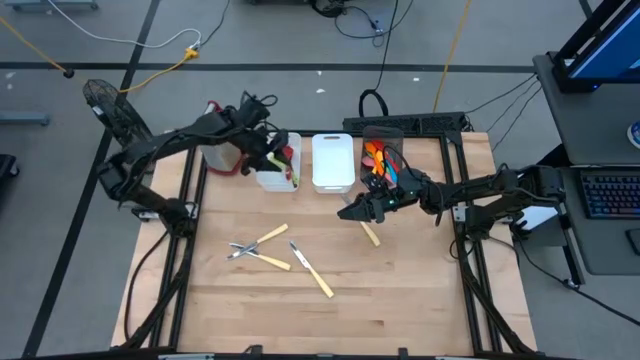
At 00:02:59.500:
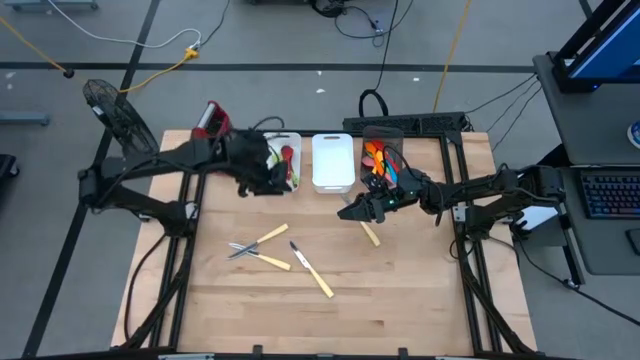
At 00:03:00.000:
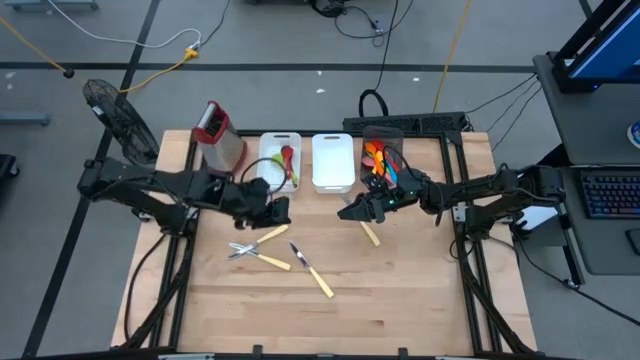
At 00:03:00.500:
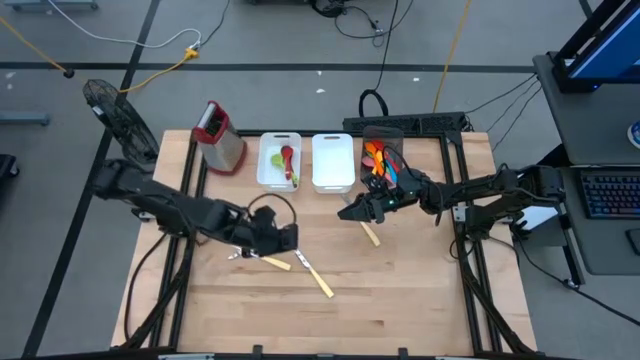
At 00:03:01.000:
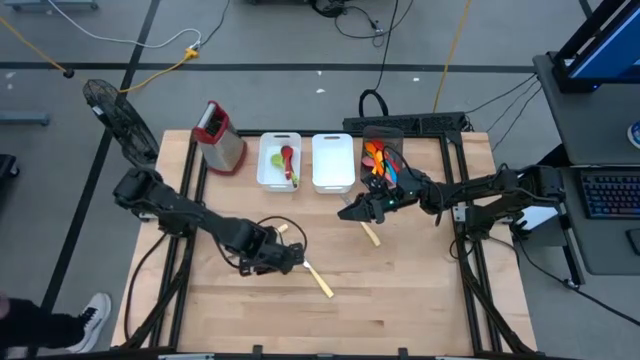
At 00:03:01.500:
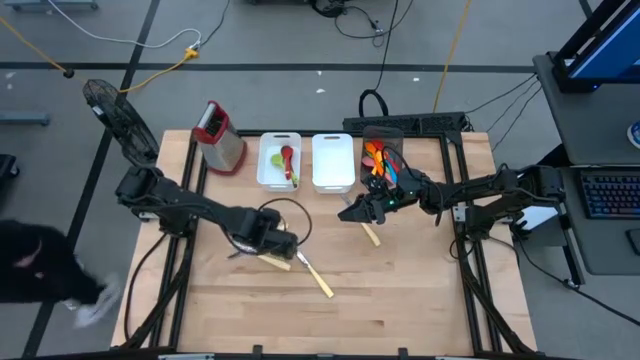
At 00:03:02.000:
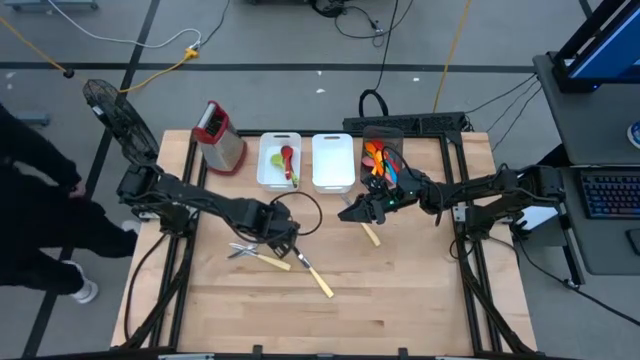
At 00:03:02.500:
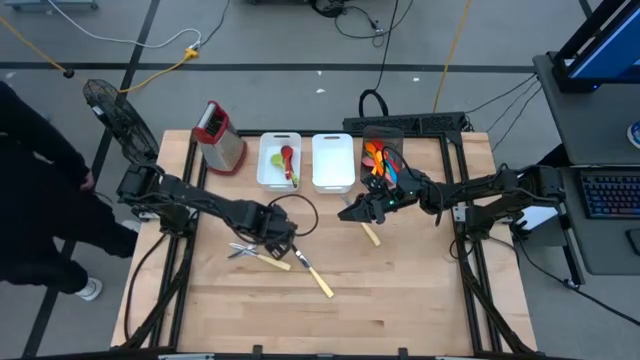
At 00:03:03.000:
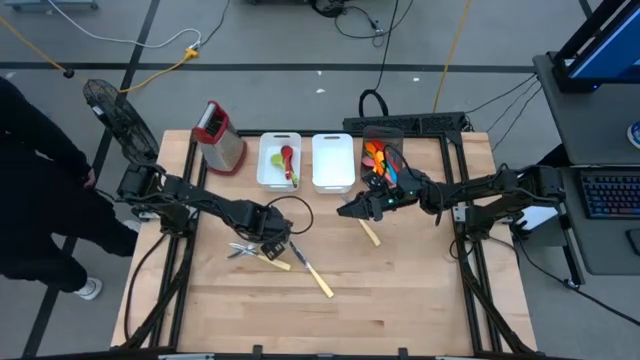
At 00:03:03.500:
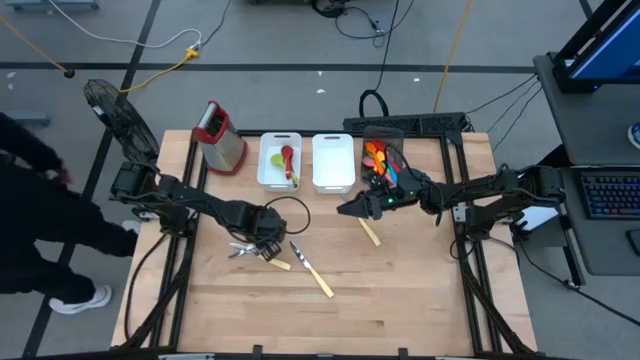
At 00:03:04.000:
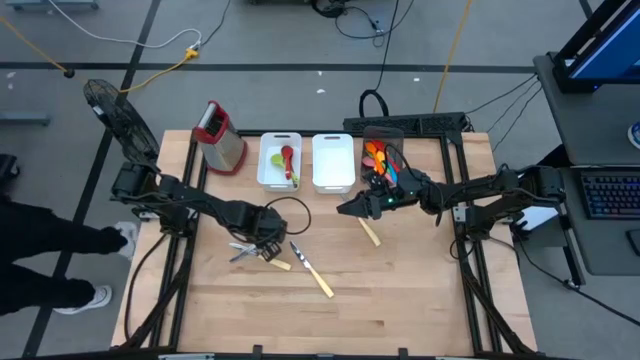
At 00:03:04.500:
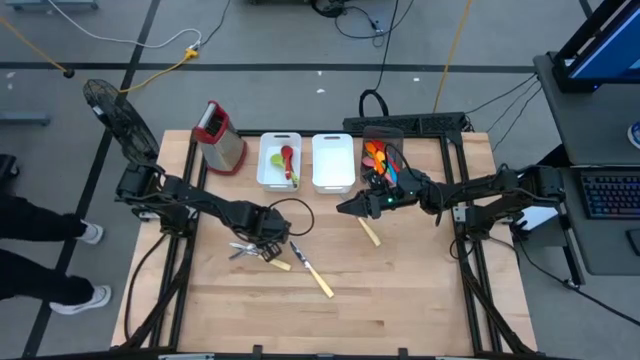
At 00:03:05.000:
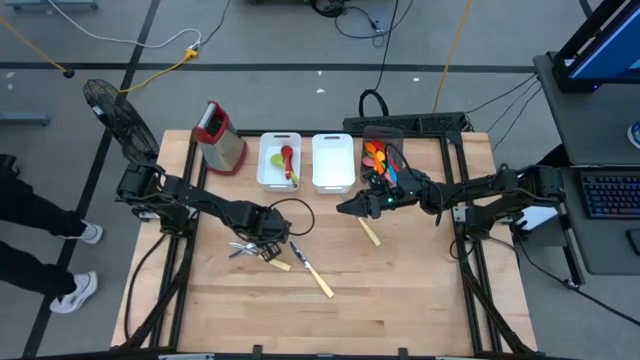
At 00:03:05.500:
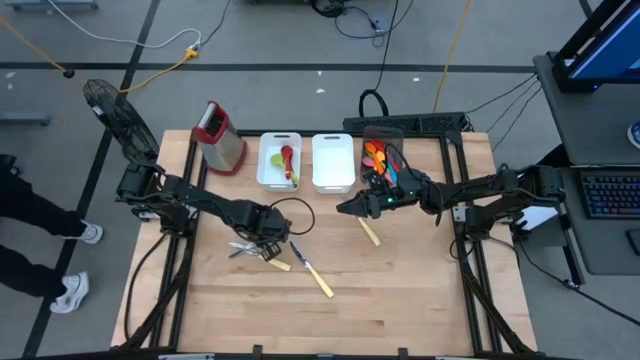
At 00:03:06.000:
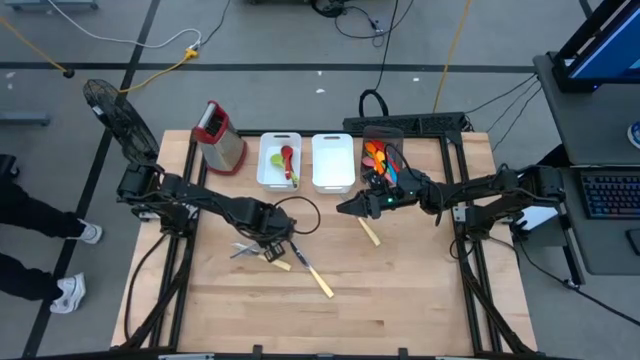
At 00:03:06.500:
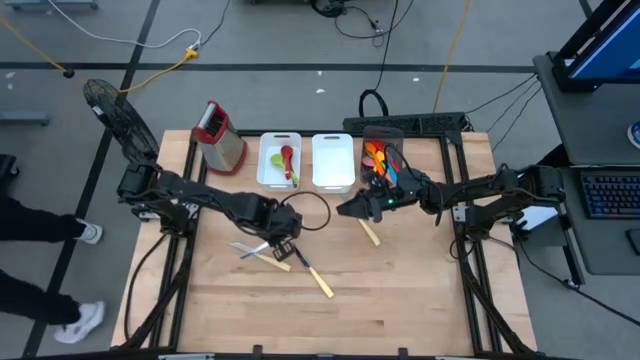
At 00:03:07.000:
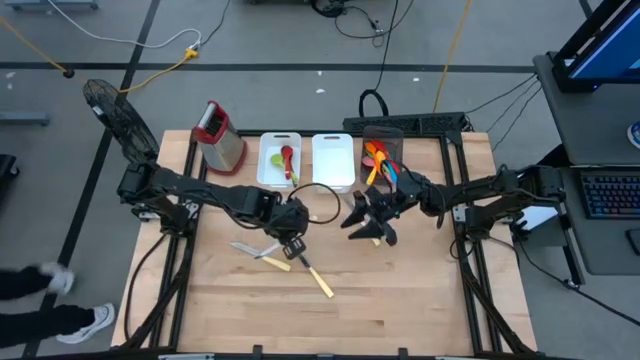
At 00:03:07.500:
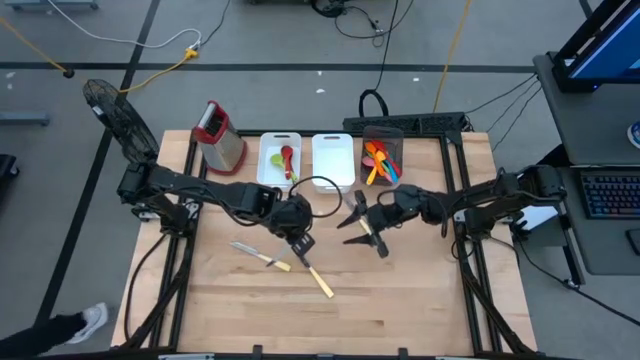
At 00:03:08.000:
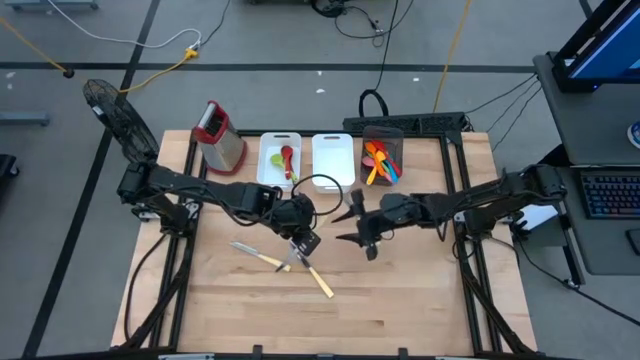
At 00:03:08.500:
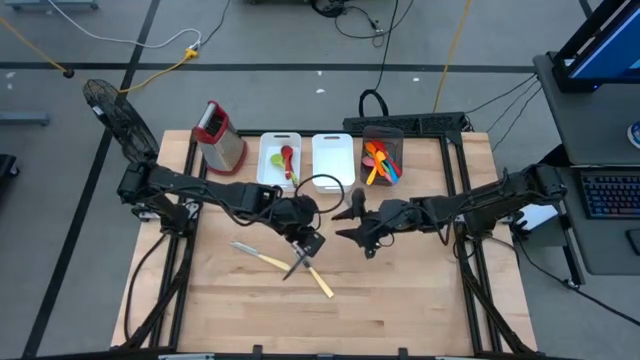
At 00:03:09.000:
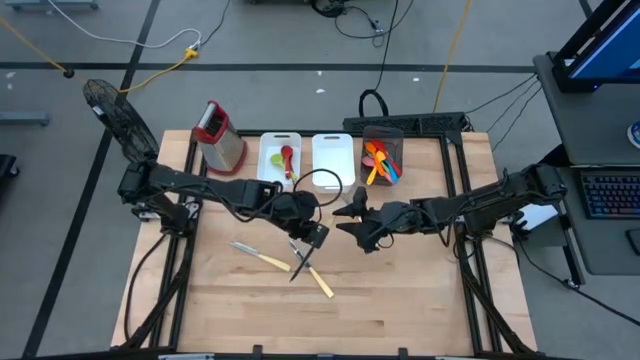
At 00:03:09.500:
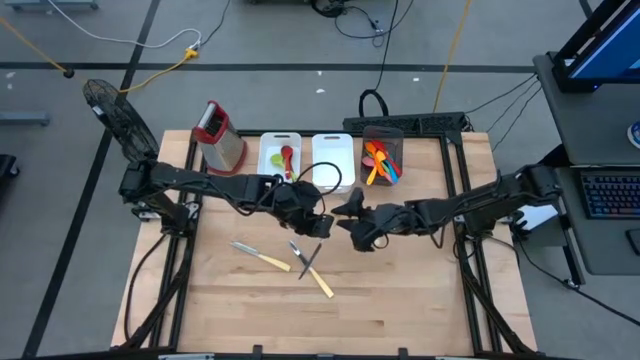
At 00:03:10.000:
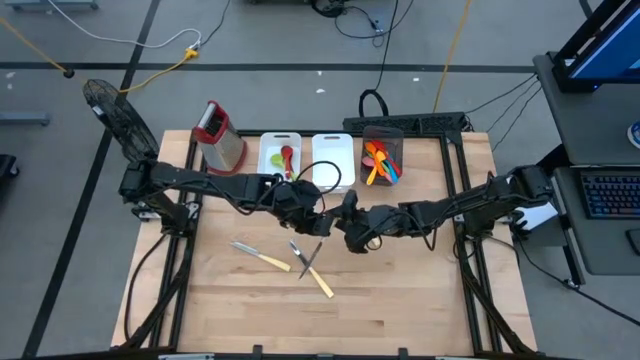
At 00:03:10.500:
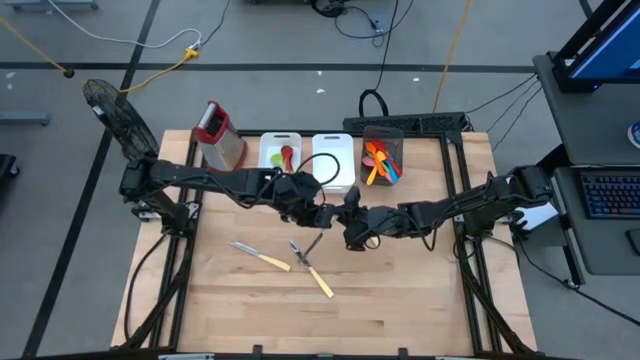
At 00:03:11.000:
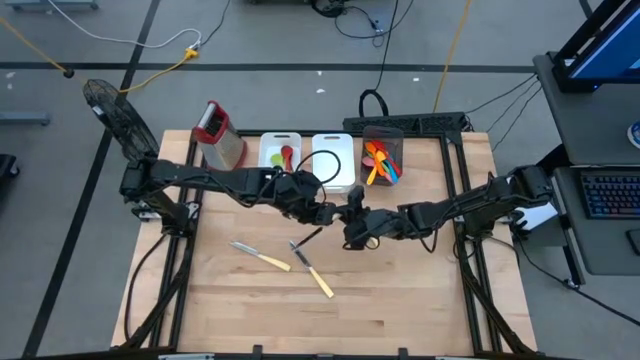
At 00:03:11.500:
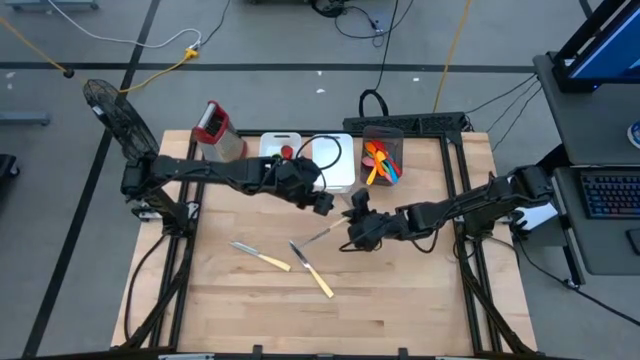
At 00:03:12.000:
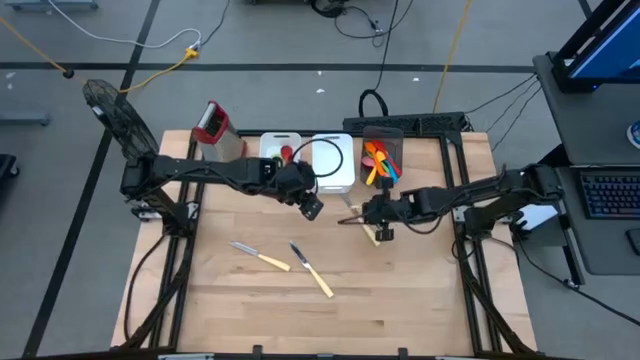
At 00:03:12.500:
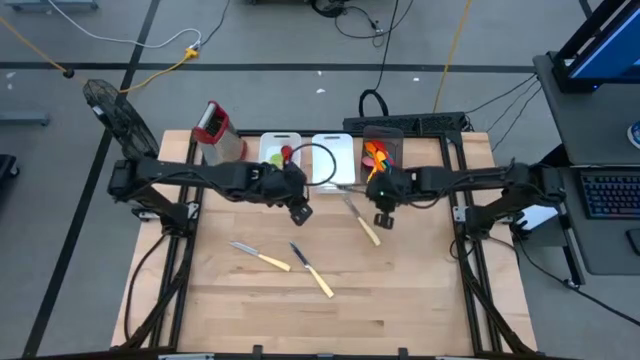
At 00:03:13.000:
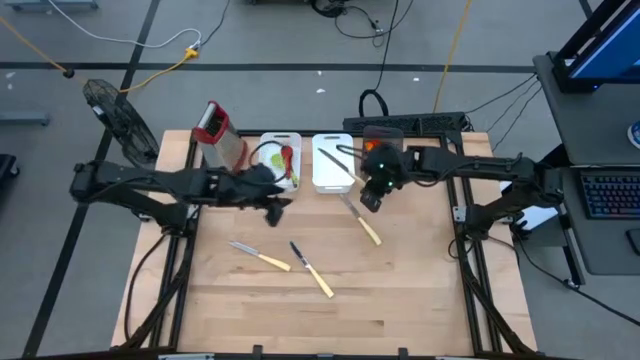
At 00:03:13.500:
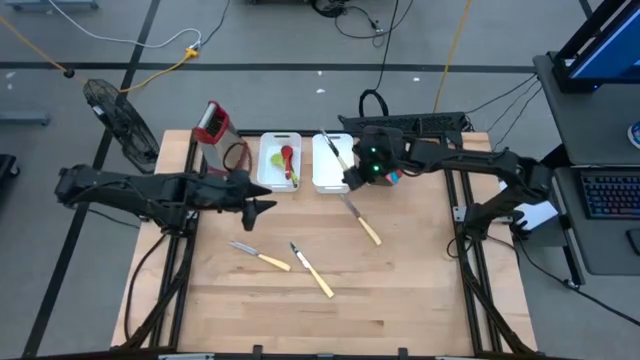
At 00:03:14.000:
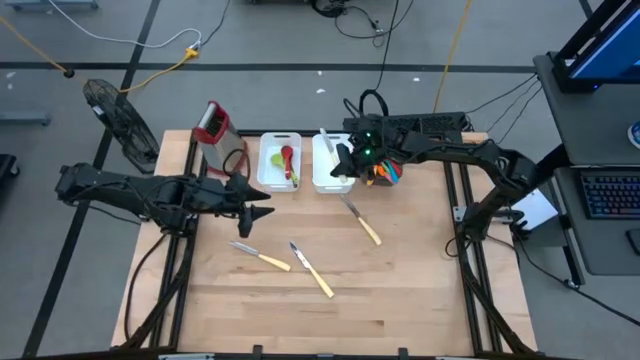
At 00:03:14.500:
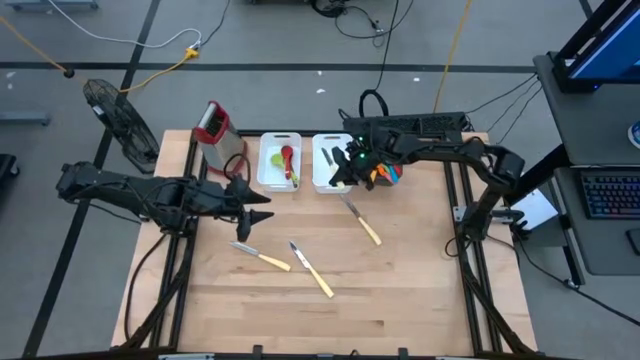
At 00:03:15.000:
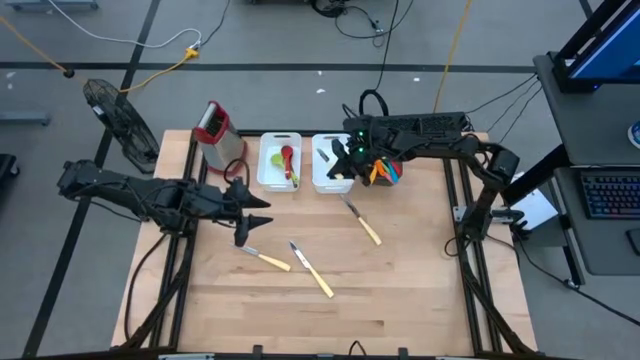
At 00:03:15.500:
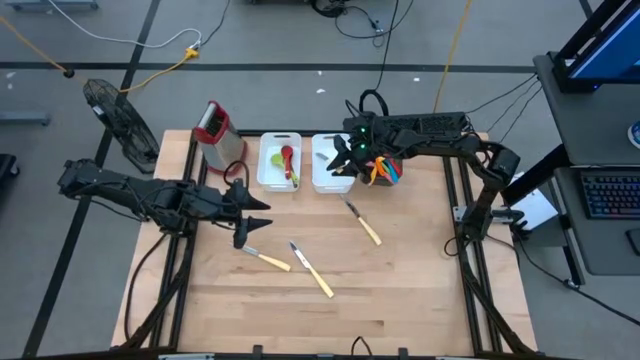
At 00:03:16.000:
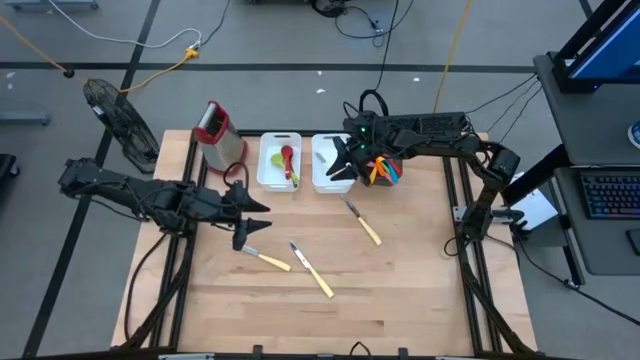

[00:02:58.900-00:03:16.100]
Task: Pick & Place Kitchen Items
Put the yellow knife into the right white bin

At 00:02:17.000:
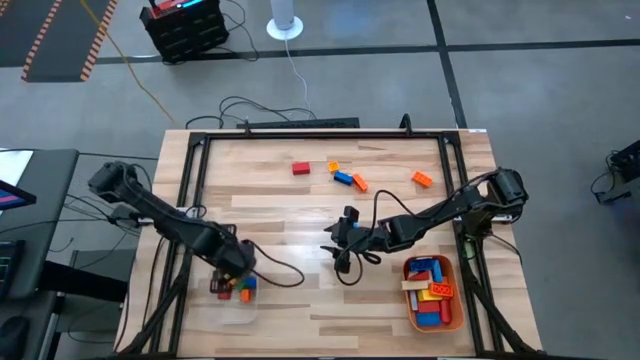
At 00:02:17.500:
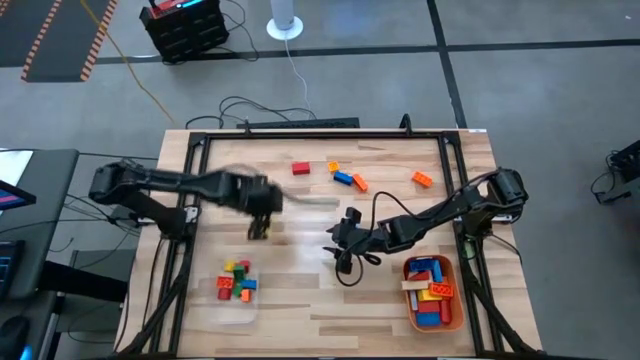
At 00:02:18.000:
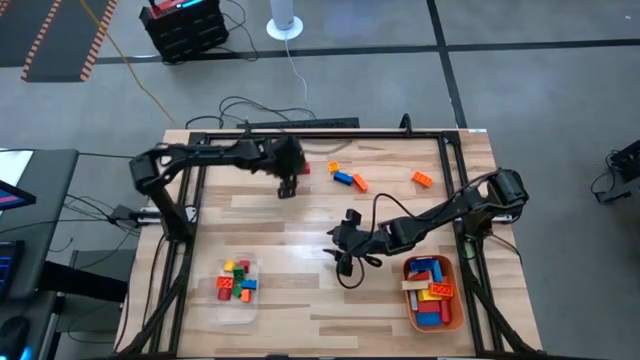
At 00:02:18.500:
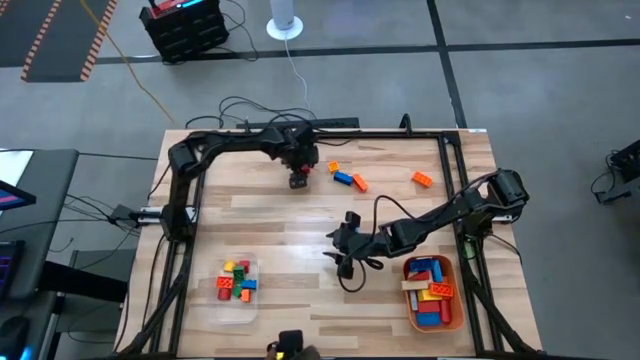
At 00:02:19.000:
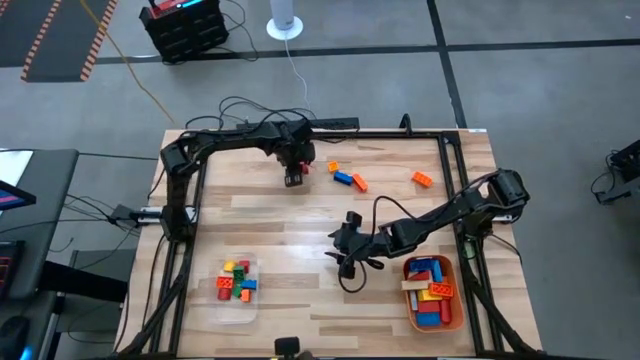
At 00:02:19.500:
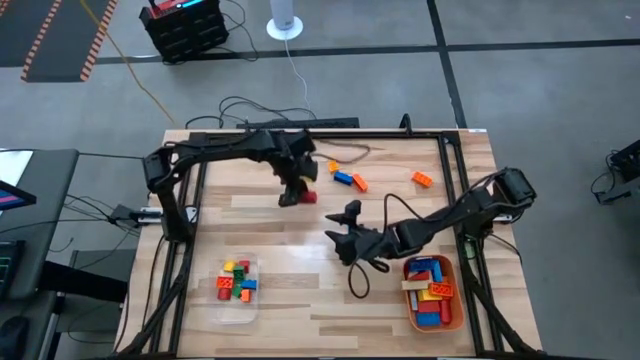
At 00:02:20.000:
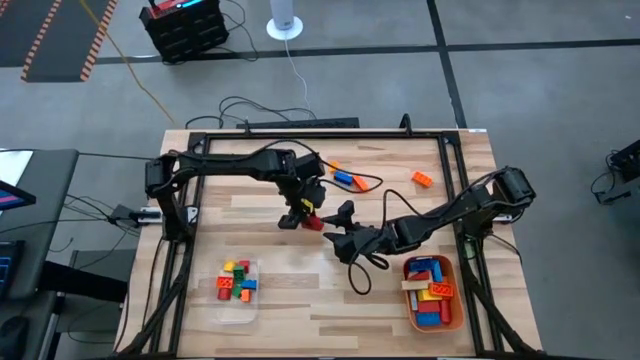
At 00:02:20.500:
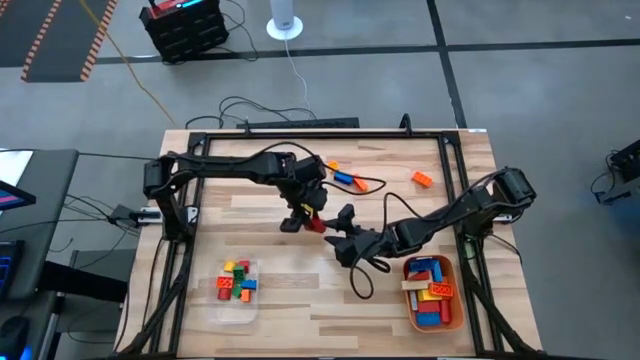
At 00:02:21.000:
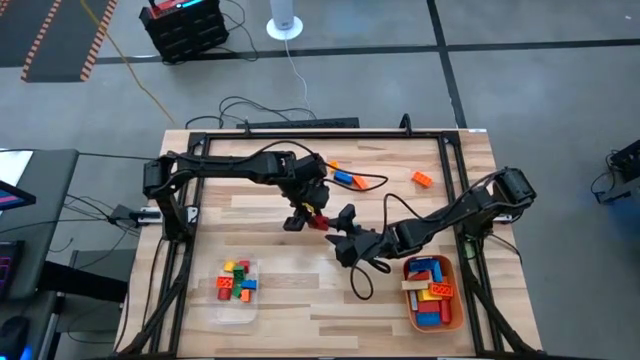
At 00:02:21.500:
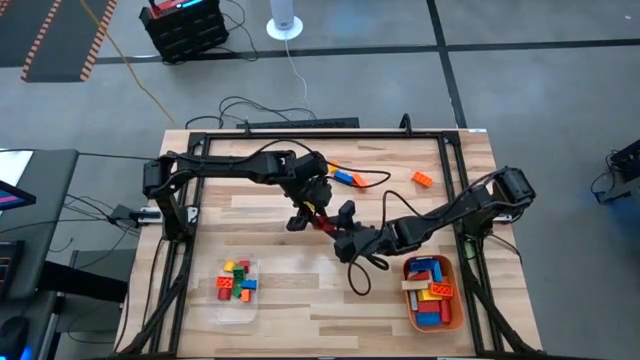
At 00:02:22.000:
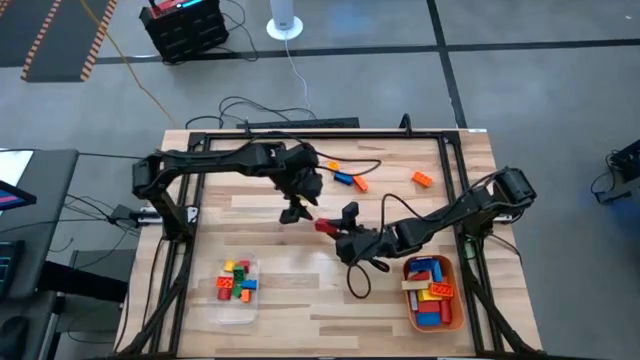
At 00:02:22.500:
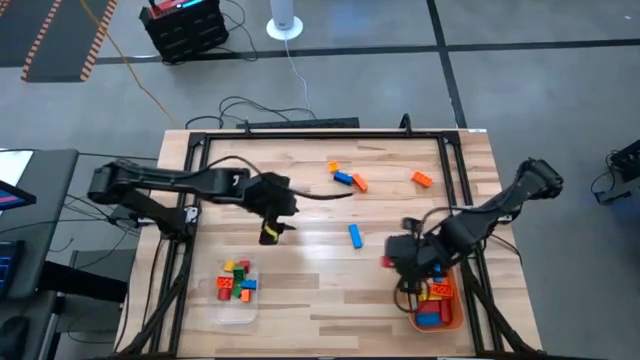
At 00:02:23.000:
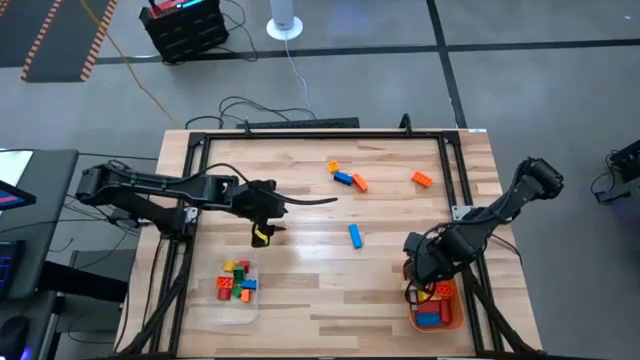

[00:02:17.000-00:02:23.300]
Task: Sort blocks by size
Put the large red block into the orange bin
